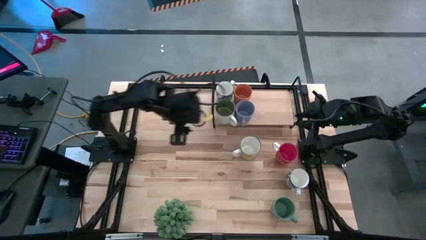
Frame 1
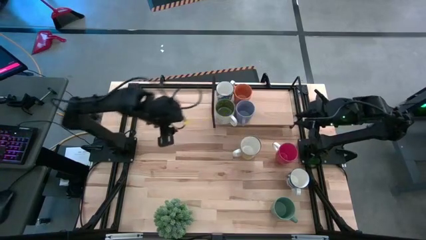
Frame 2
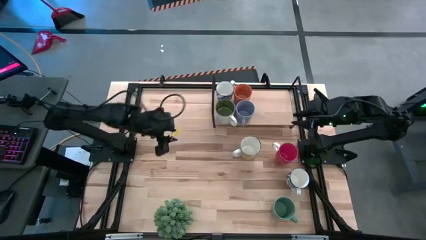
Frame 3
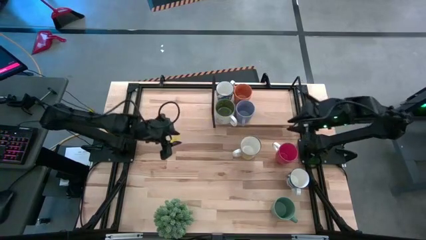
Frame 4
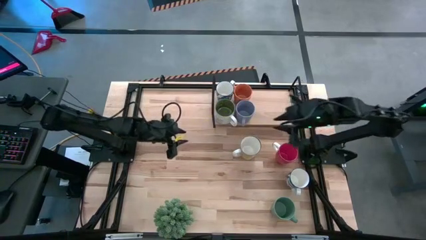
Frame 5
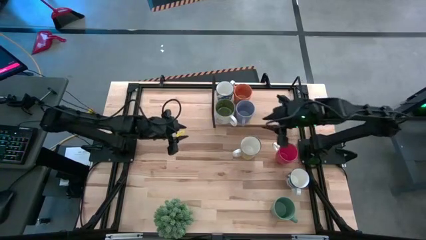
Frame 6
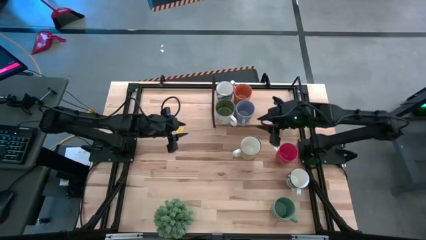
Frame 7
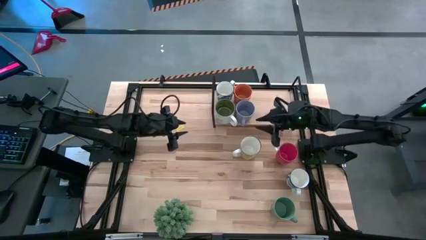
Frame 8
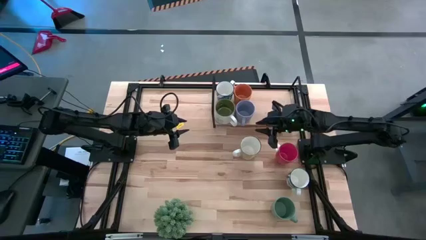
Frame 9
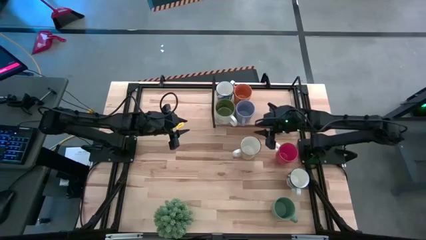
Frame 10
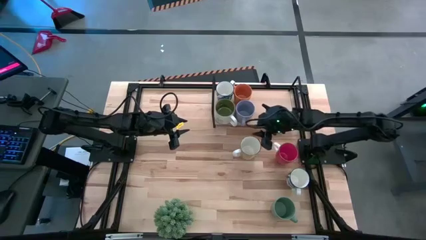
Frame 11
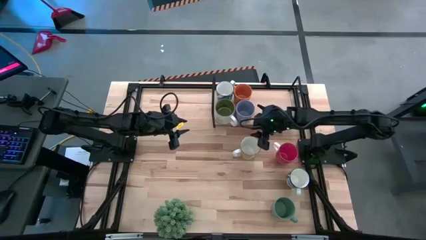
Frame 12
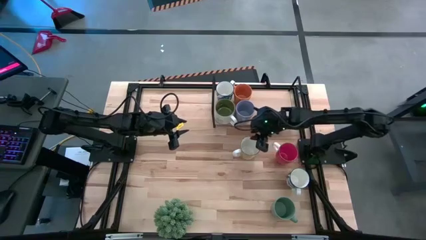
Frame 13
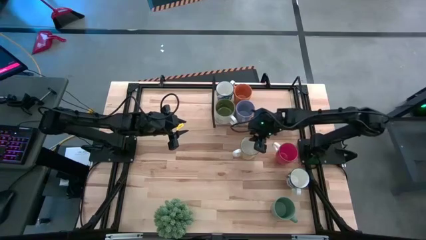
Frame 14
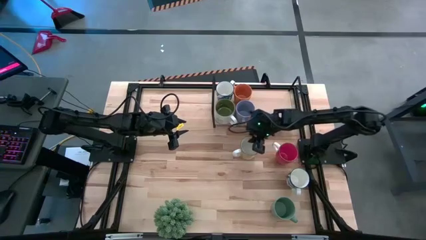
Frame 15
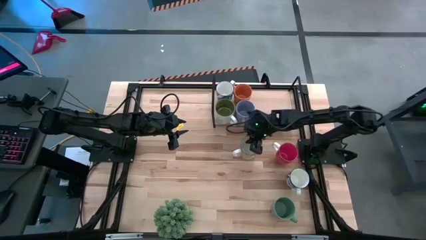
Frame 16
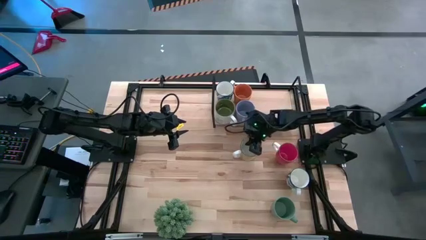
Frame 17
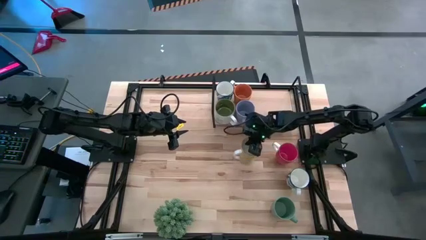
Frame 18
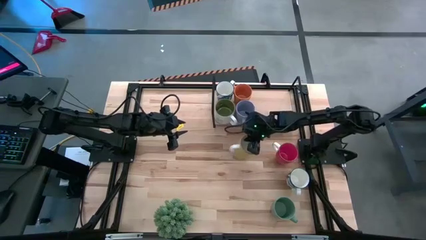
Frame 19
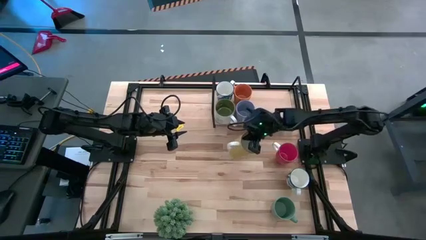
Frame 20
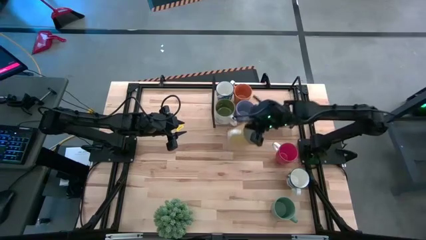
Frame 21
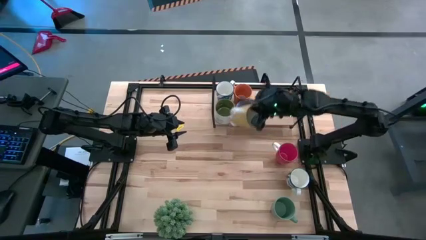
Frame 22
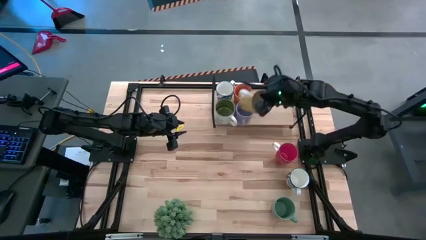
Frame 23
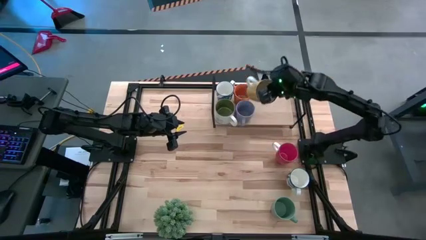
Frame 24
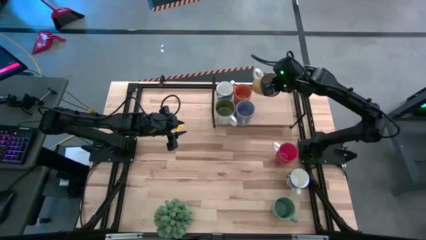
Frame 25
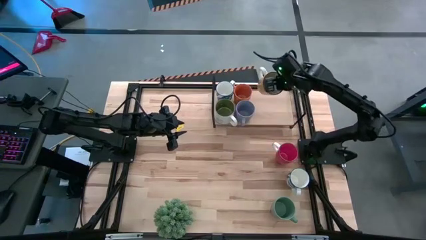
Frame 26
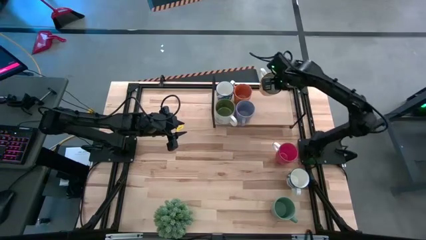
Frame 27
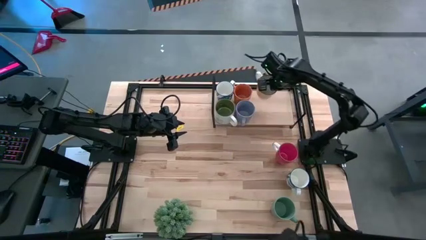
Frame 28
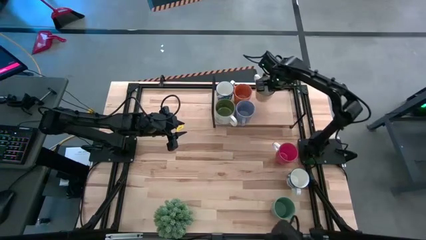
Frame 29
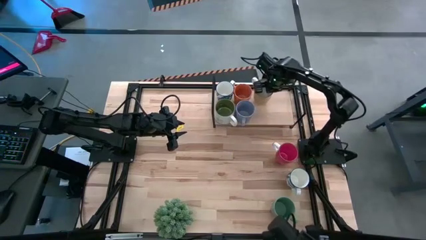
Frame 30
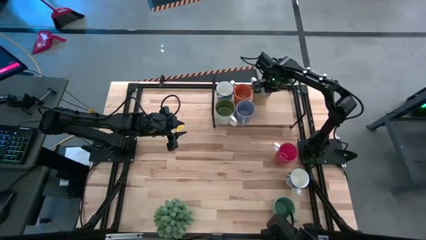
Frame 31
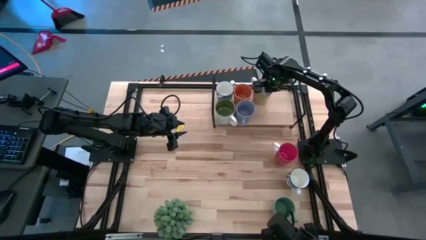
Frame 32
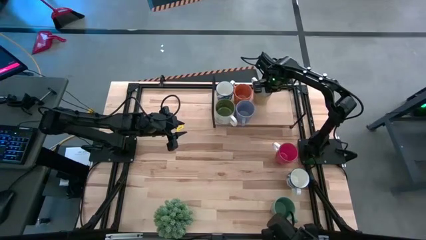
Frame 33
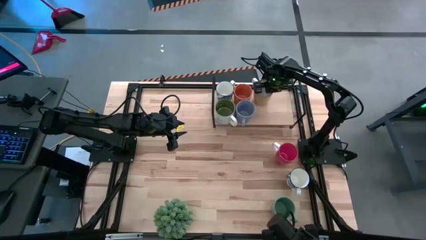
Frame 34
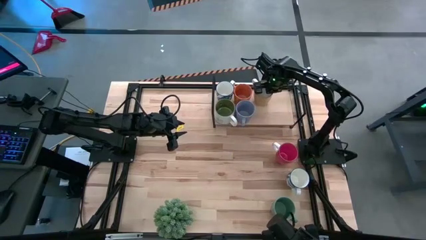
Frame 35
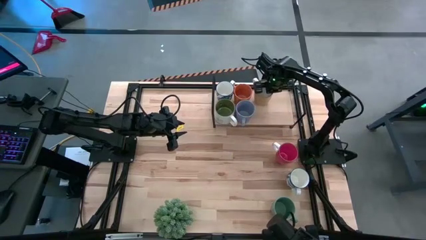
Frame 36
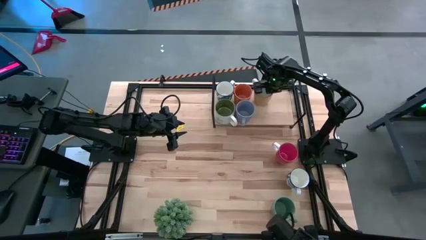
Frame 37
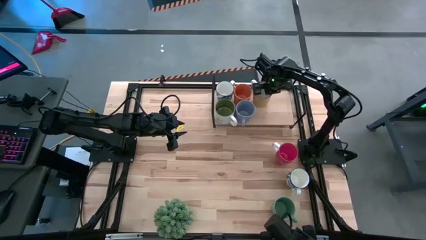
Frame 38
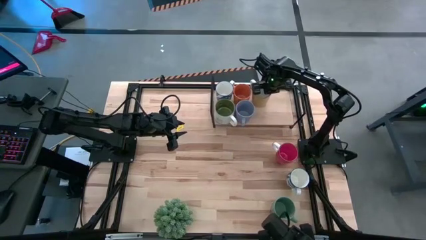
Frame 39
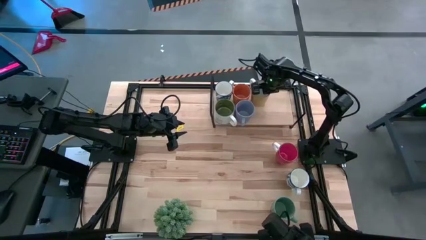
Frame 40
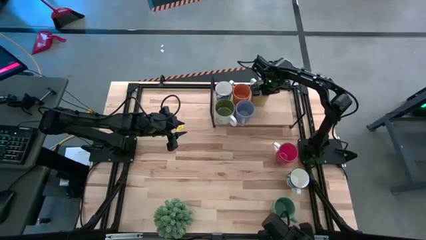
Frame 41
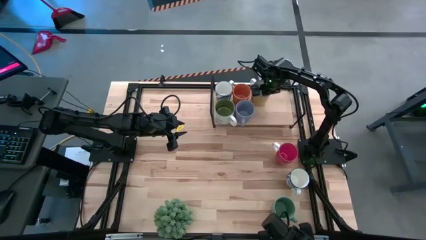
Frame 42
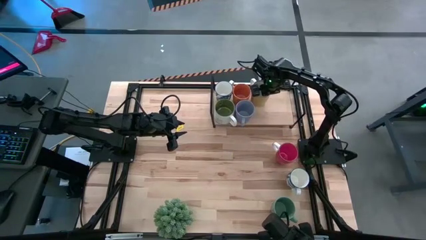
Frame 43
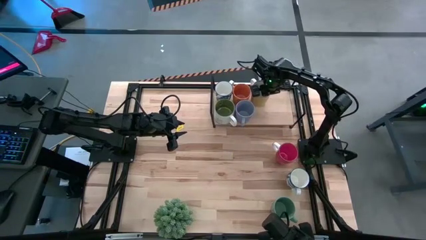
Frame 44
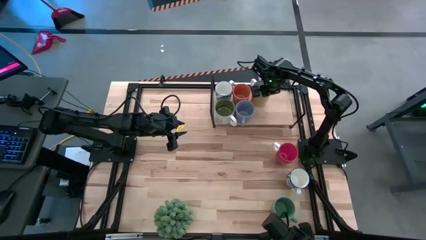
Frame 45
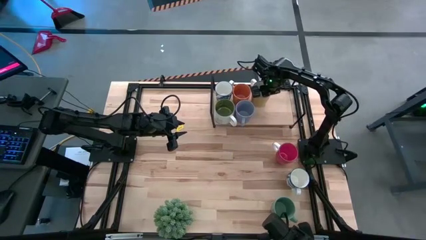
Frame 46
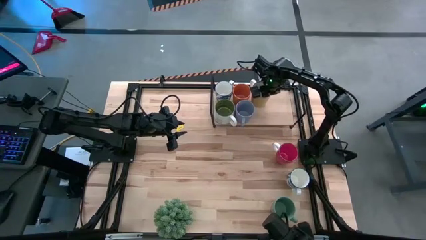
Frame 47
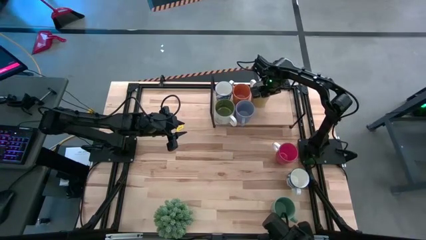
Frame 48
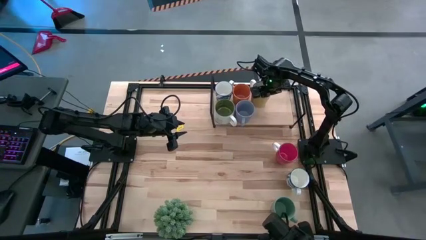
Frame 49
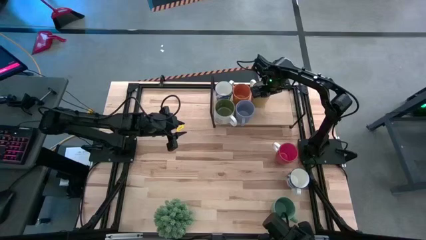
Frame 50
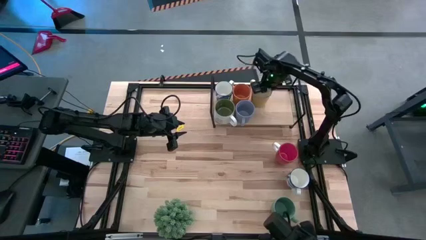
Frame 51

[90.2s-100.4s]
Task: Place coffee mugs
Put the yellow mug on the shelf

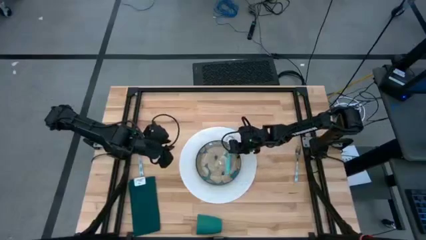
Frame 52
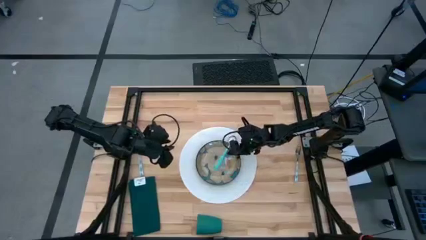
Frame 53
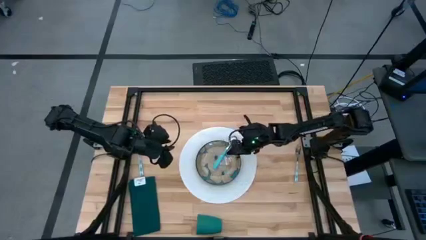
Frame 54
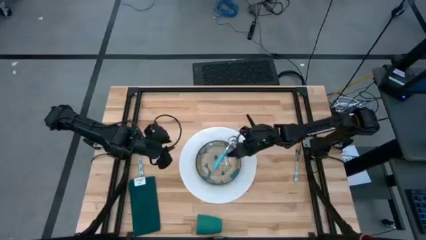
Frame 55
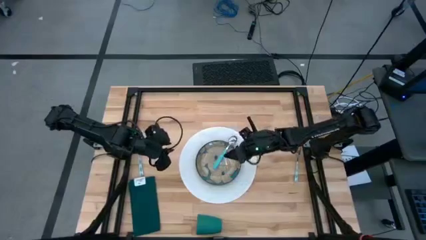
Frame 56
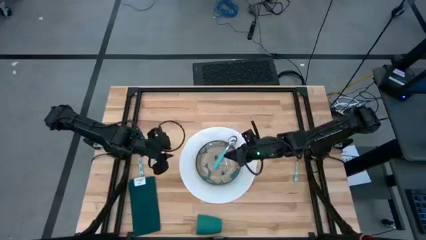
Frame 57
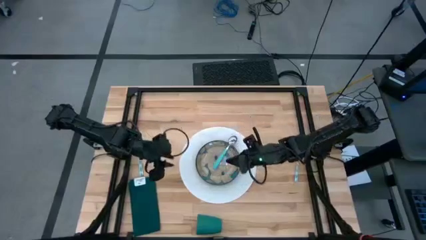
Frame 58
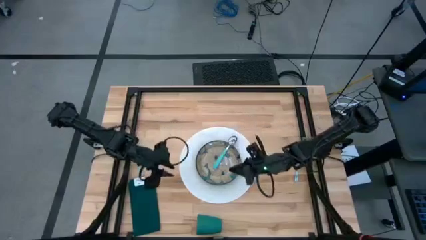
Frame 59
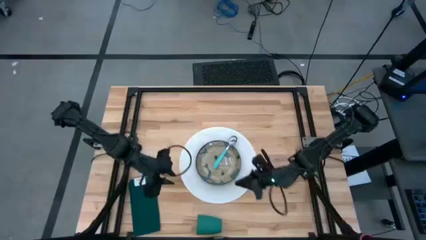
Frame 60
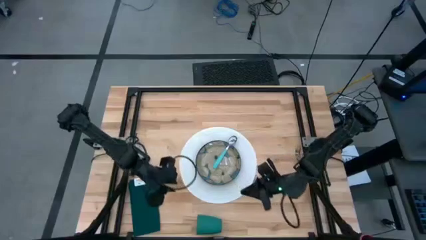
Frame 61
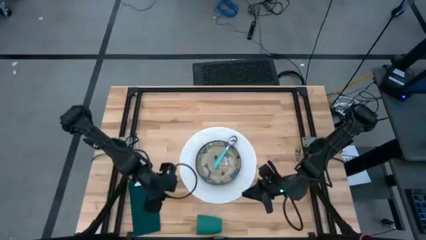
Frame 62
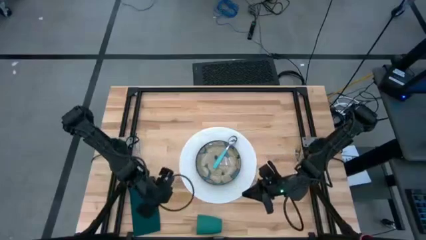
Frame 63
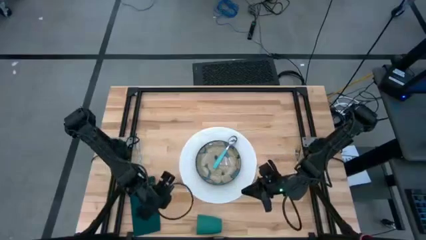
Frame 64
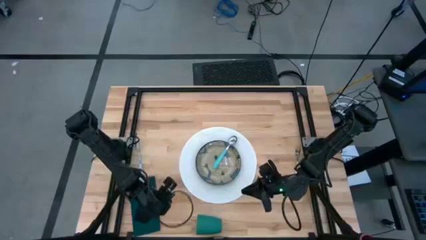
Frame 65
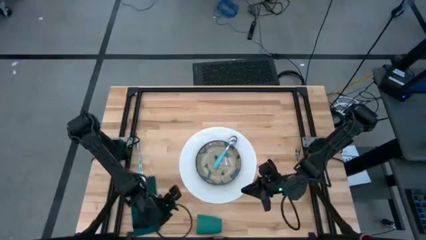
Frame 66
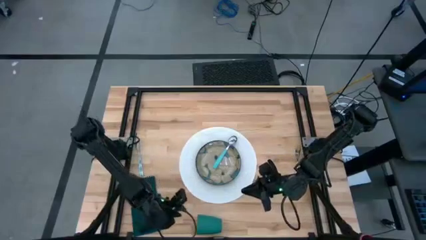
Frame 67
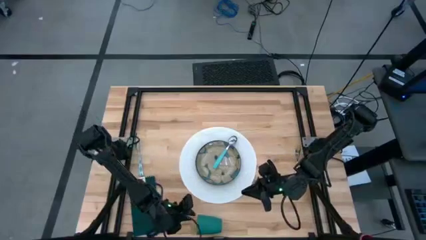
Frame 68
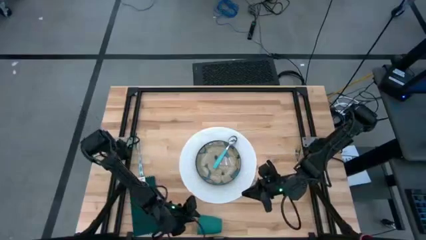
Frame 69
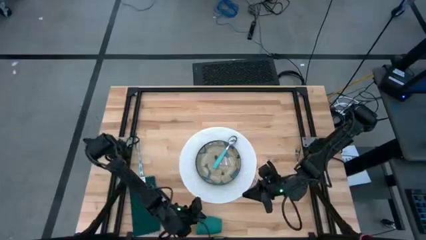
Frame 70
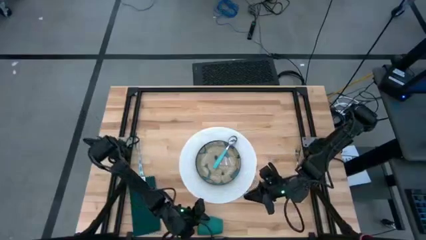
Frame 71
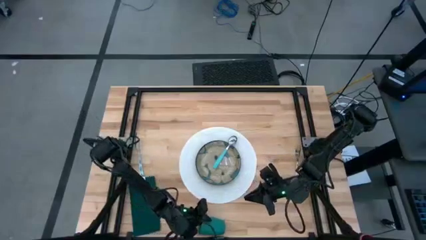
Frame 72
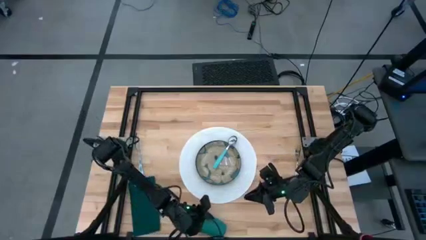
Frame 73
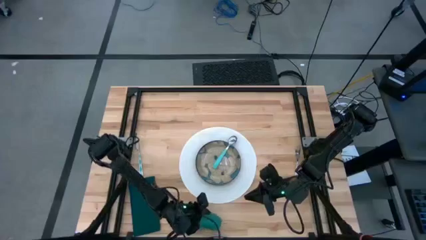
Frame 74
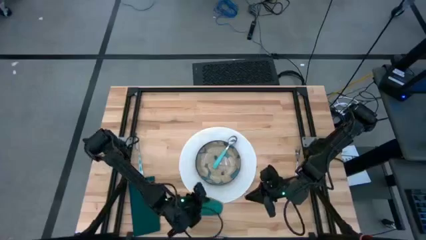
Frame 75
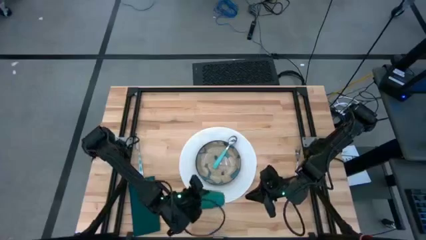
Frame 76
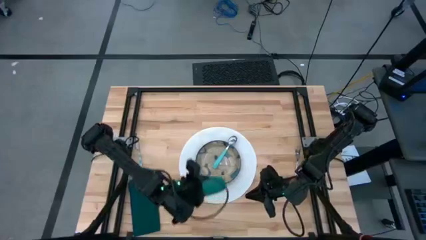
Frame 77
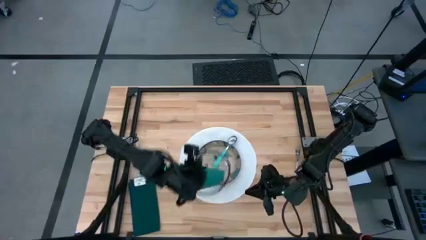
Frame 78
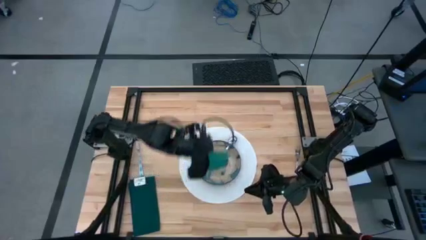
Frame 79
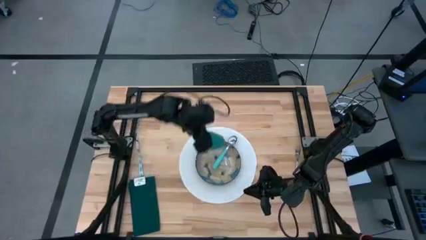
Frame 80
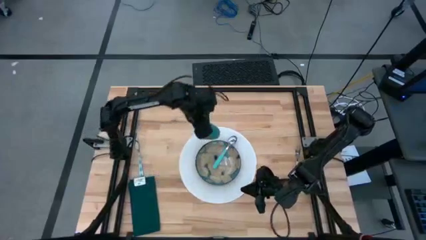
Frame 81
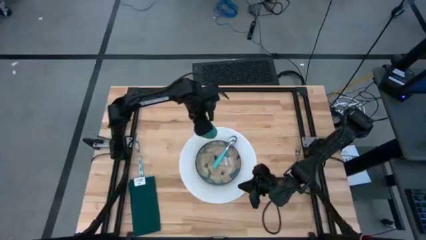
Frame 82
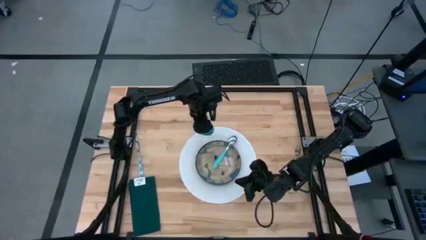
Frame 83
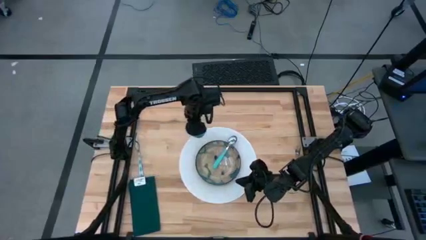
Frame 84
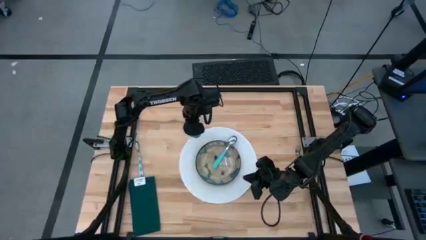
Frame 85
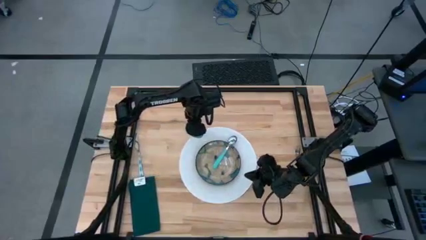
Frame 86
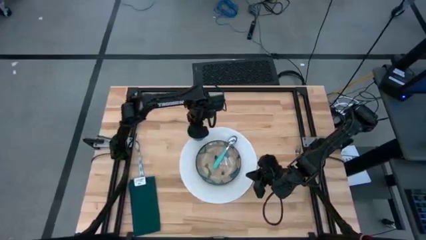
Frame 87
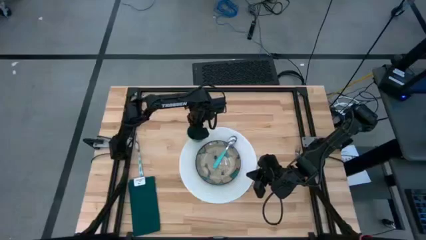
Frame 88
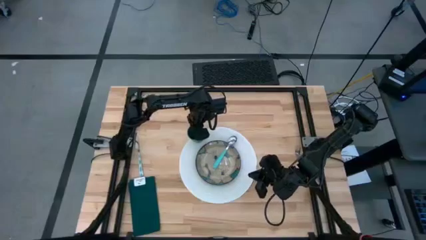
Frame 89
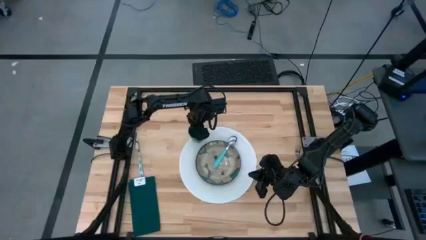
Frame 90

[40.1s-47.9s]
Task: Set table place
Put the dark green cup on the top left of the white table mat
